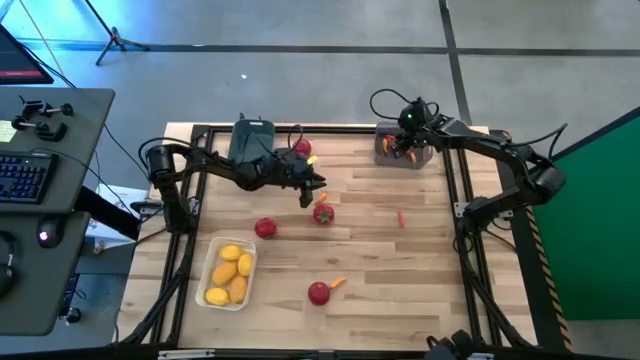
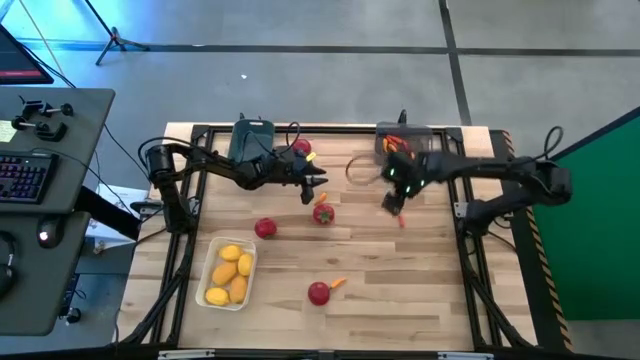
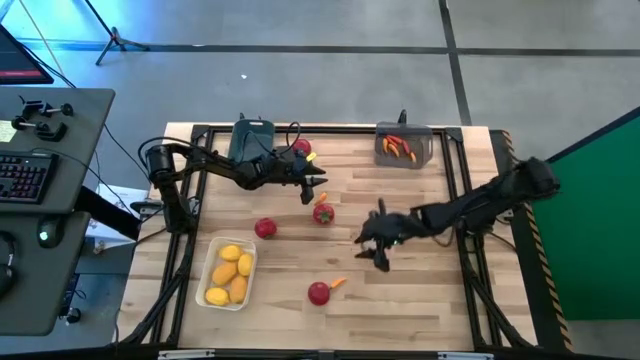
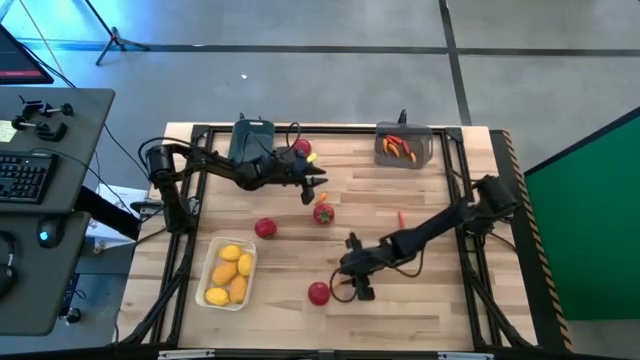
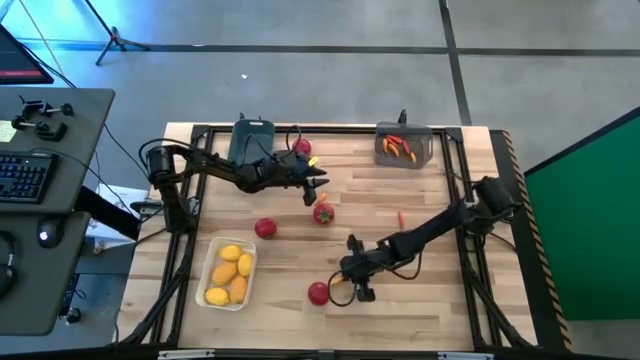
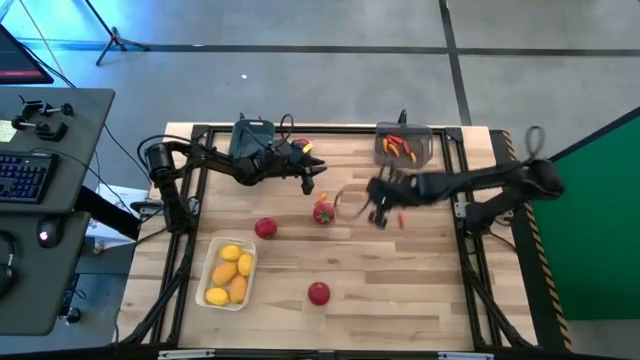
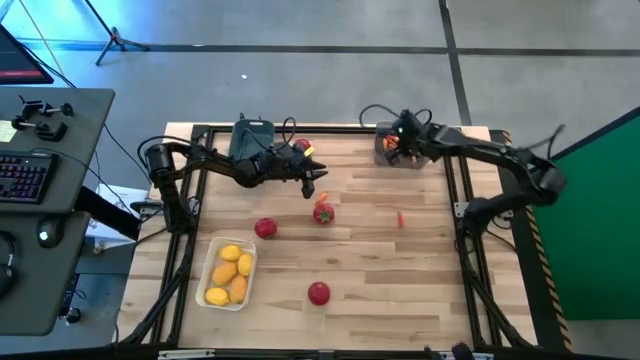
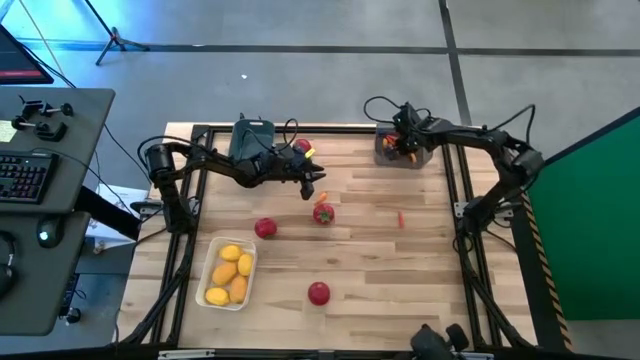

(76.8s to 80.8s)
Task: Sort produce into baskets
Put the orange chili pepper into the black bin

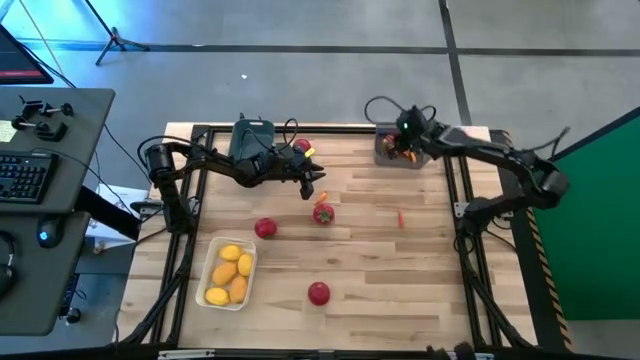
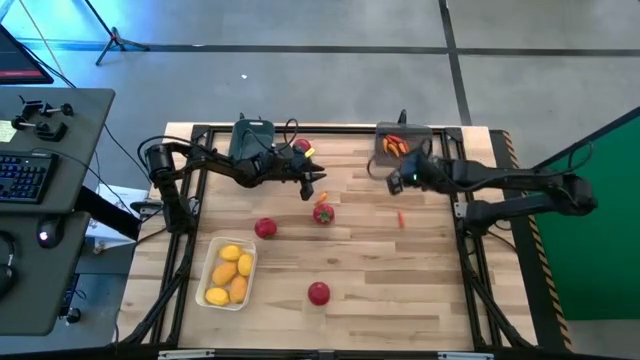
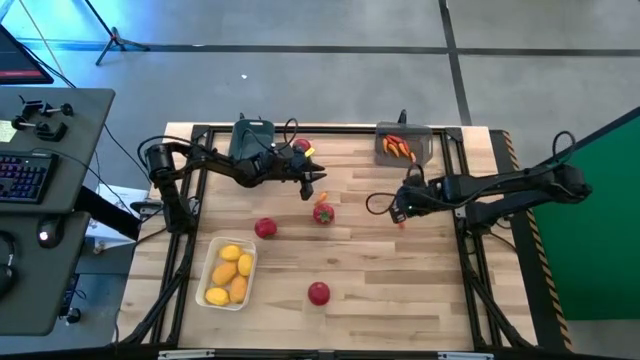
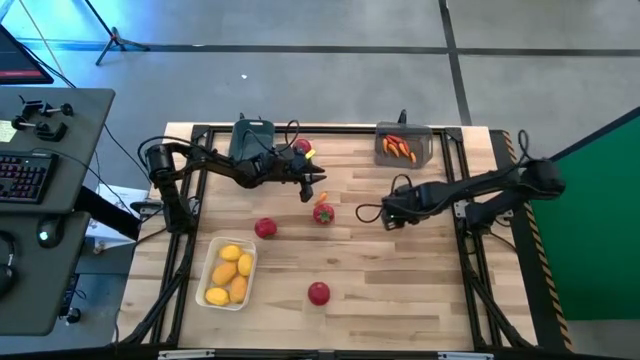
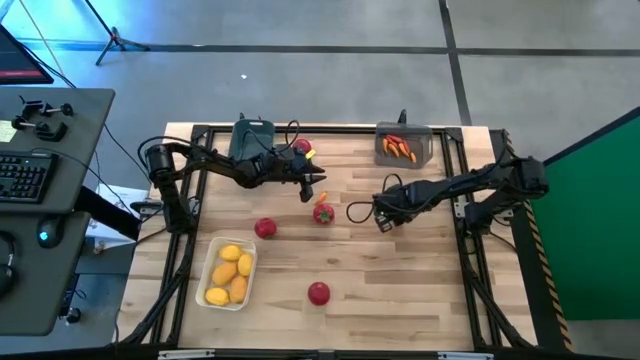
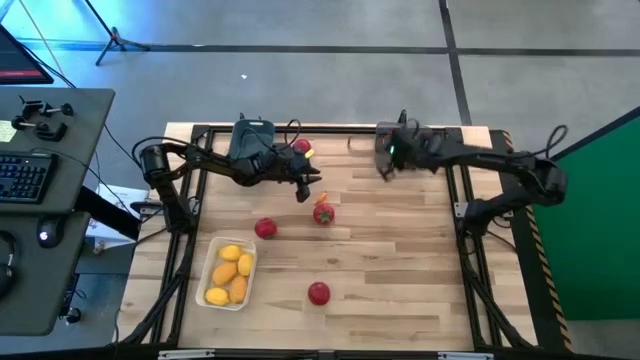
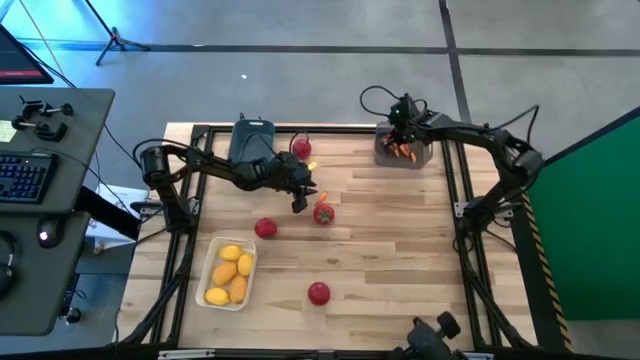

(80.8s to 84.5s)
Put the red chili pepper into the black bin

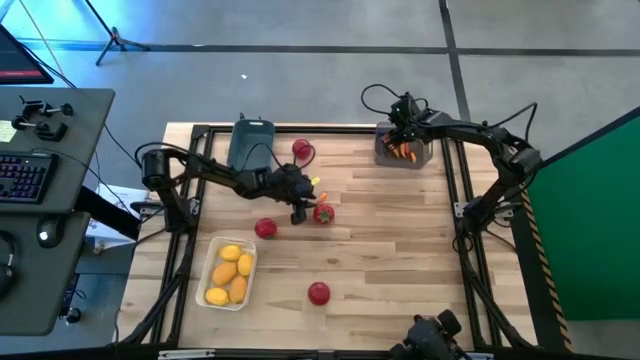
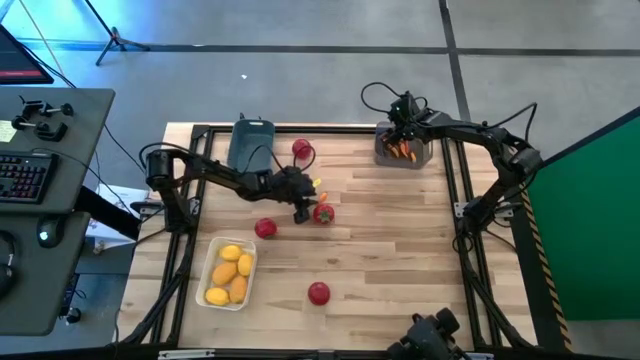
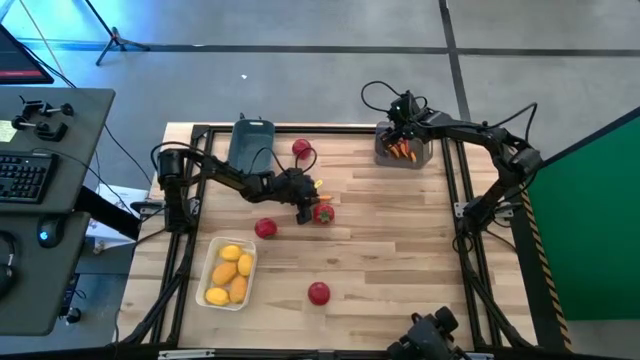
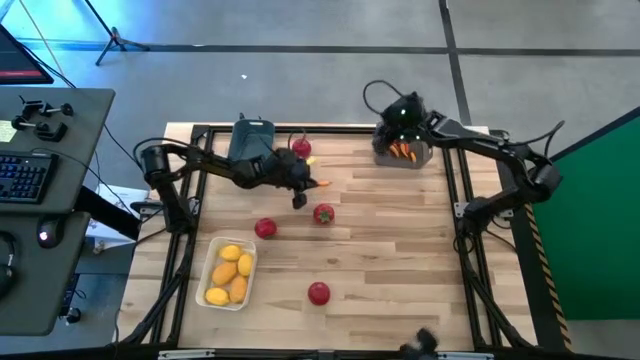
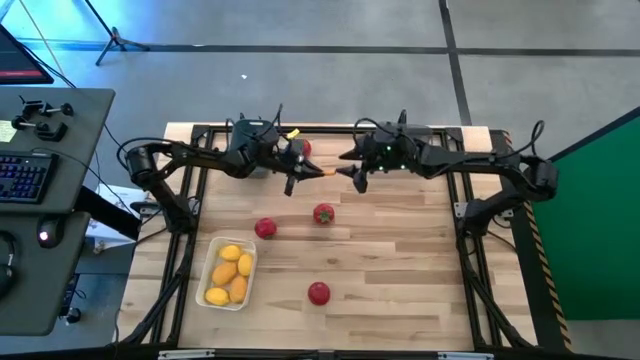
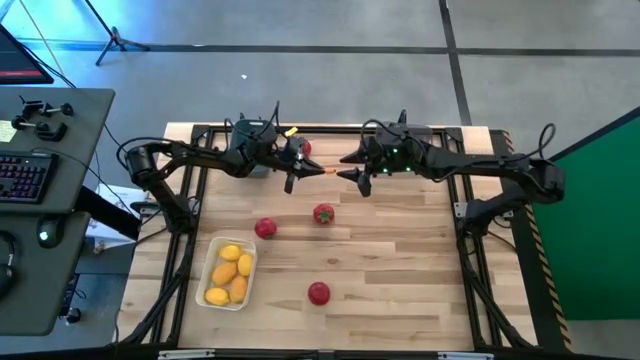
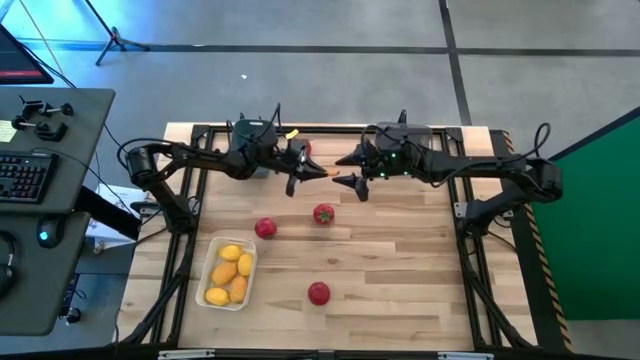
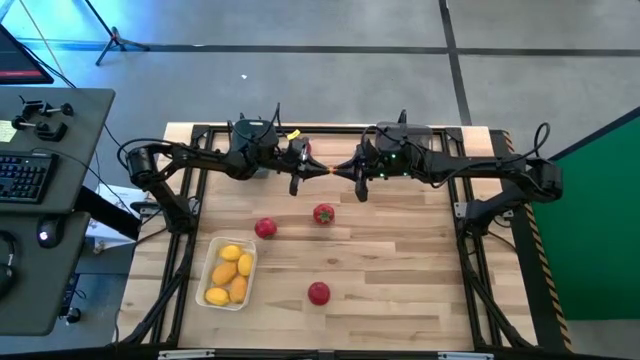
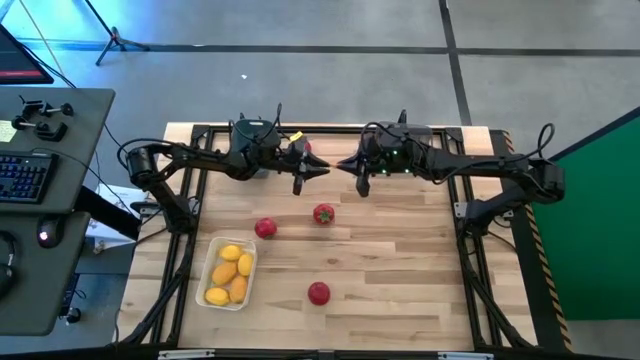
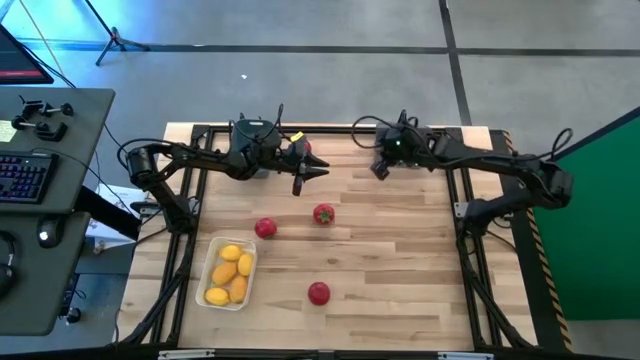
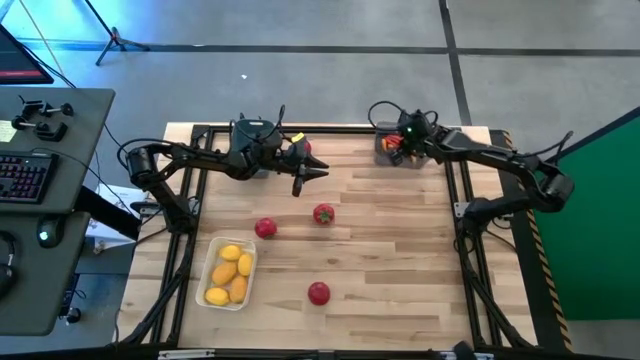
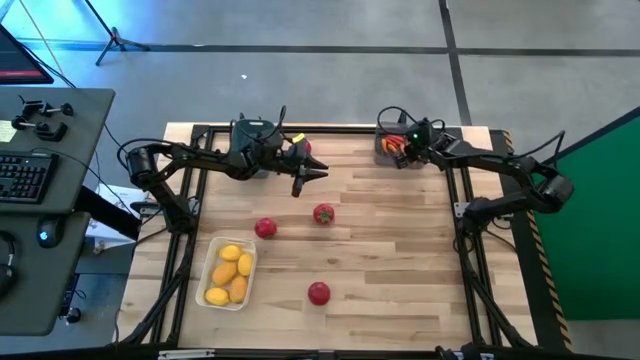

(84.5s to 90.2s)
Put the orange chili pepper into the black bin

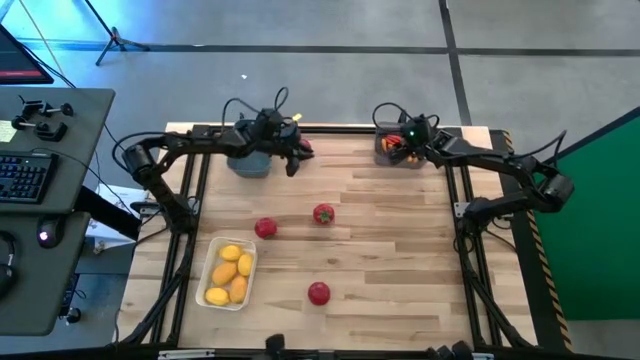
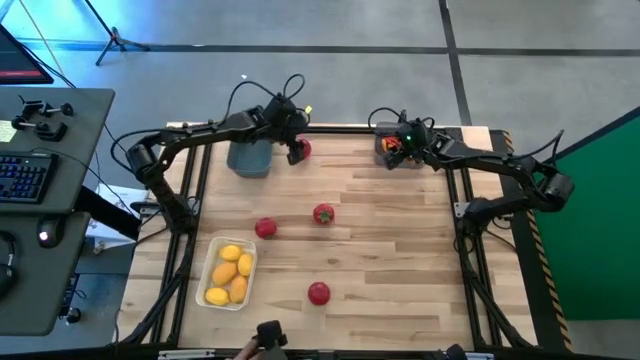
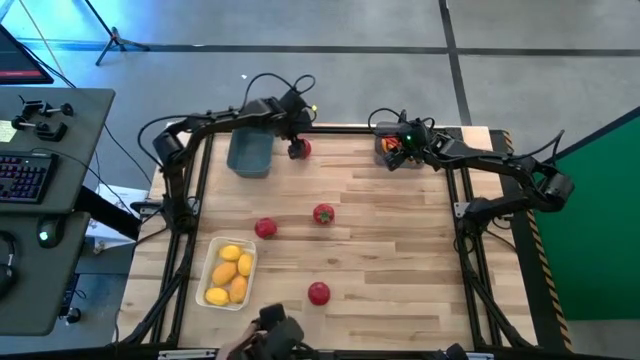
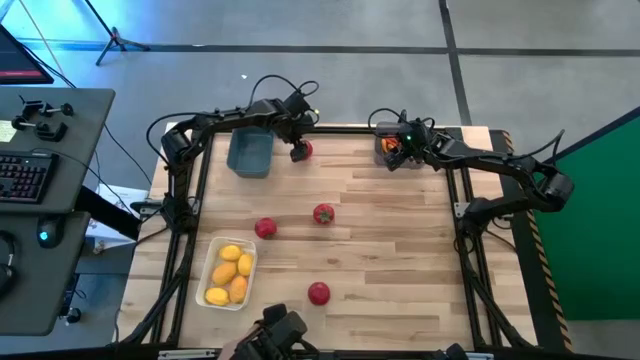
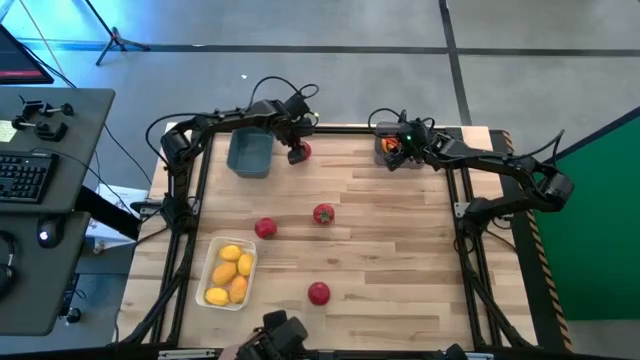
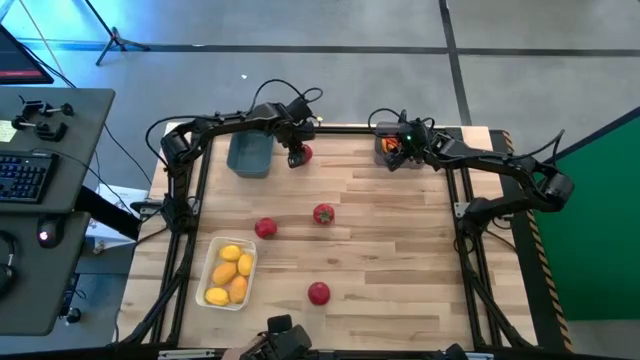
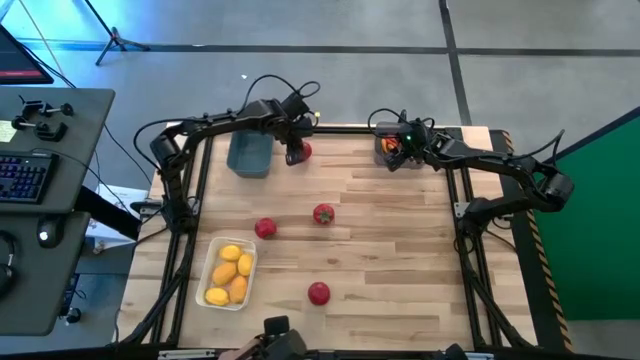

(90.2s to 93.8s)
Put the red tomato into the green bin

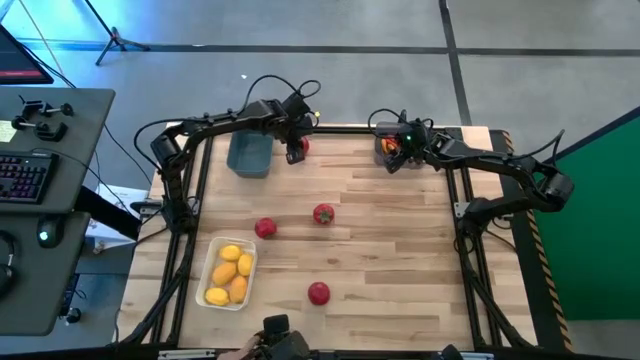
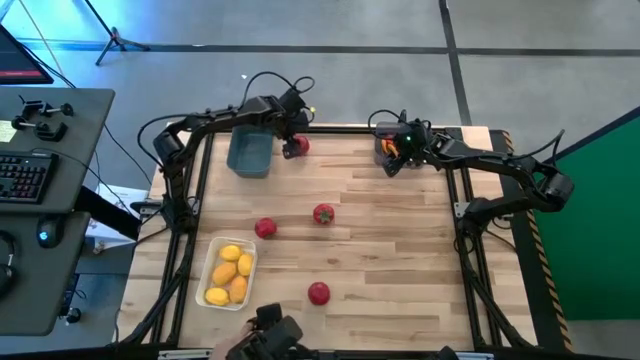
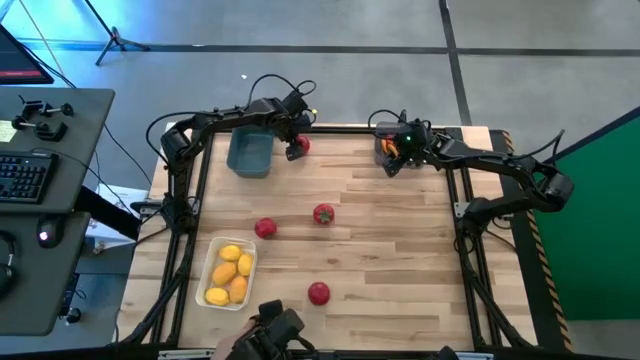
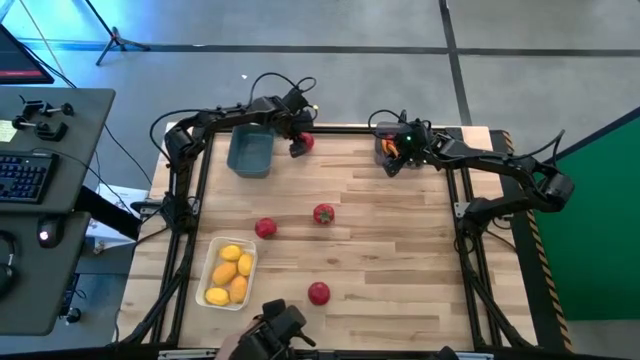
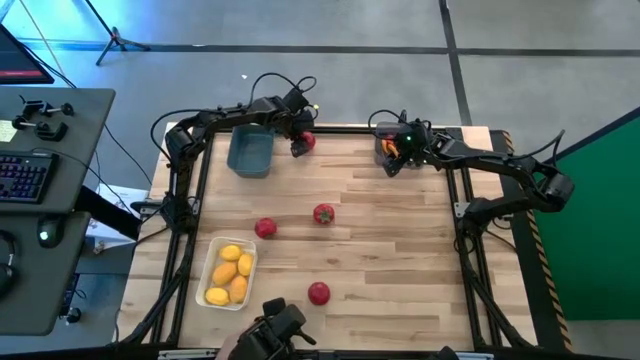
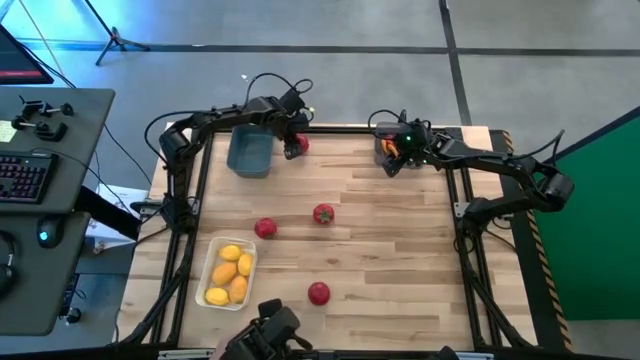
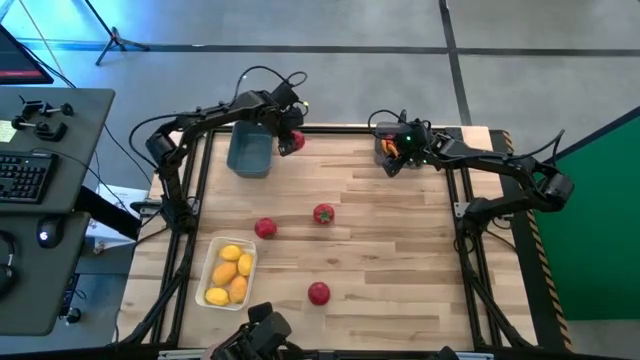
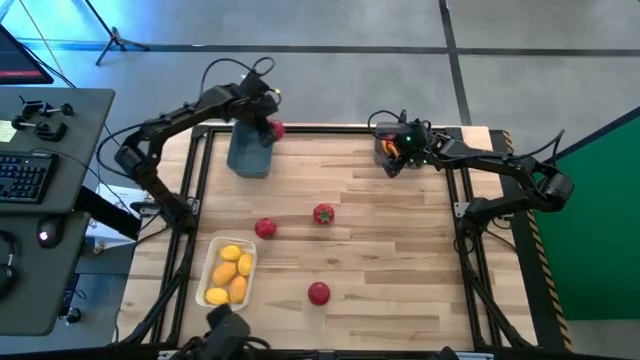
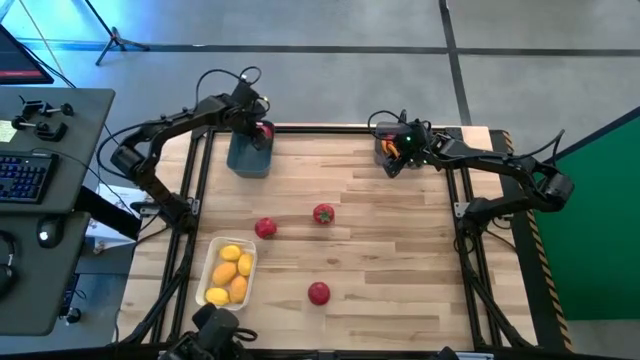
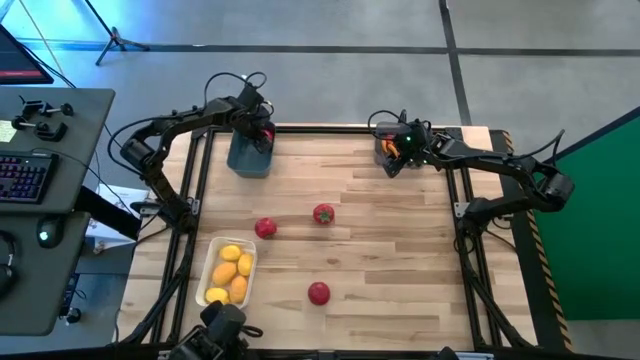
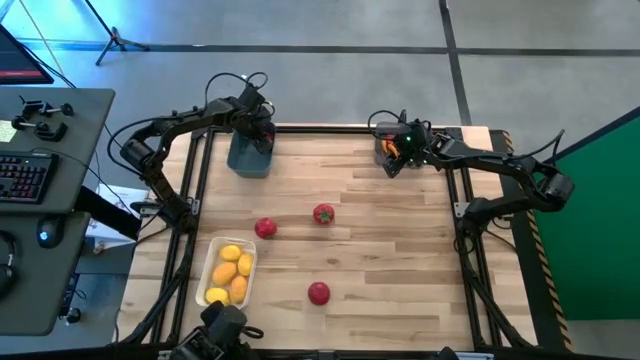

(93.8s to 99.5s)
Put the red tomato into the green bin
